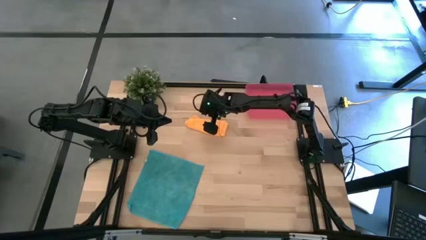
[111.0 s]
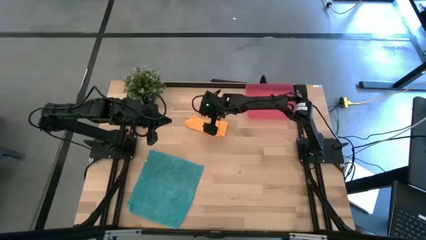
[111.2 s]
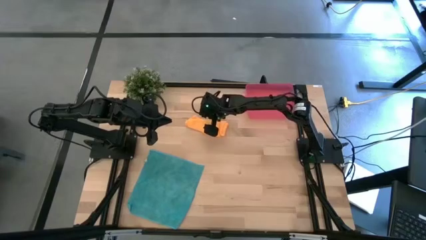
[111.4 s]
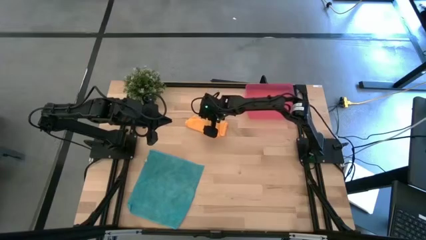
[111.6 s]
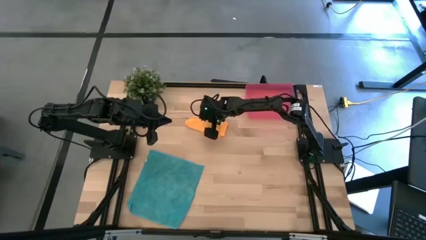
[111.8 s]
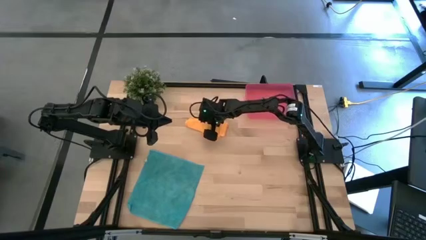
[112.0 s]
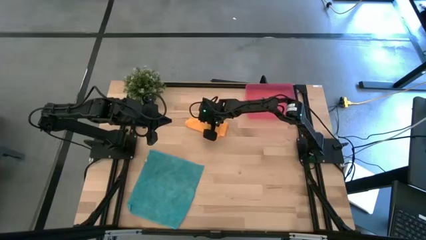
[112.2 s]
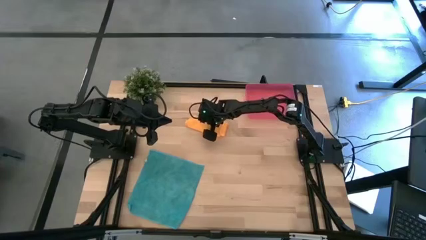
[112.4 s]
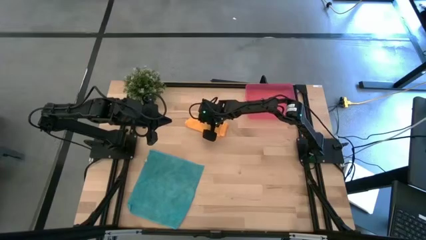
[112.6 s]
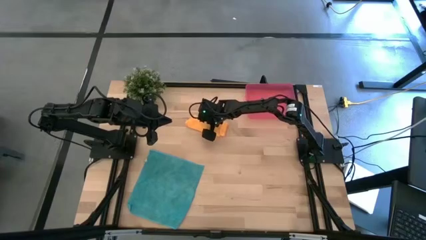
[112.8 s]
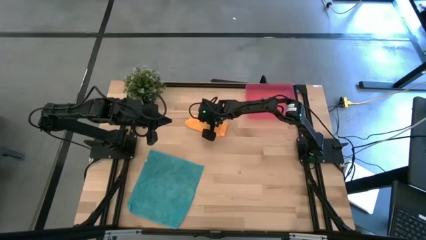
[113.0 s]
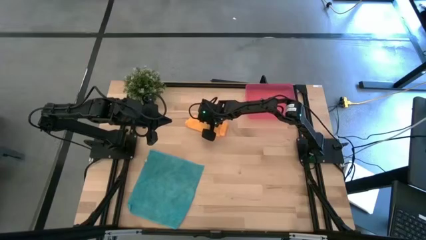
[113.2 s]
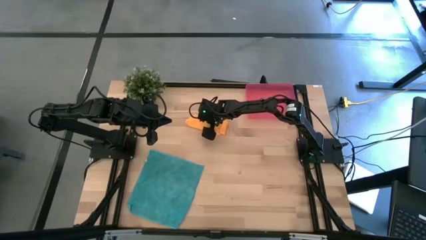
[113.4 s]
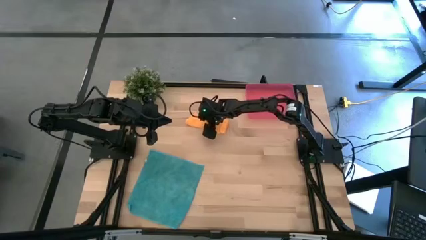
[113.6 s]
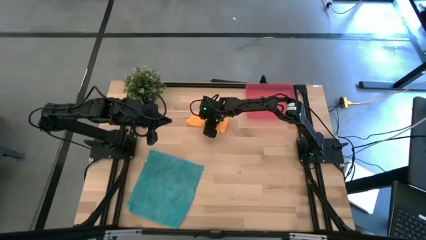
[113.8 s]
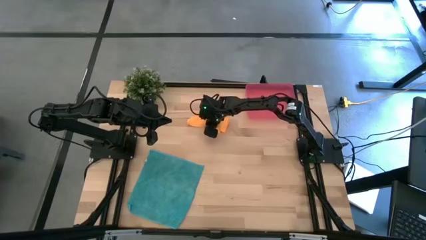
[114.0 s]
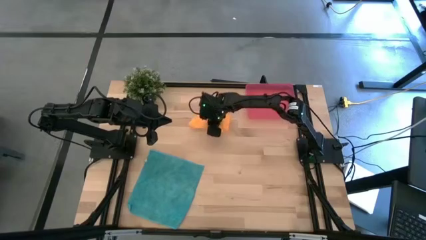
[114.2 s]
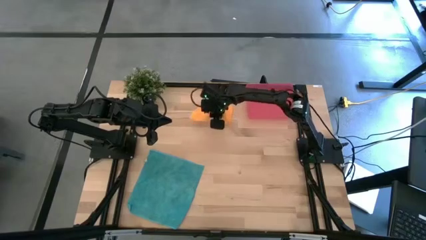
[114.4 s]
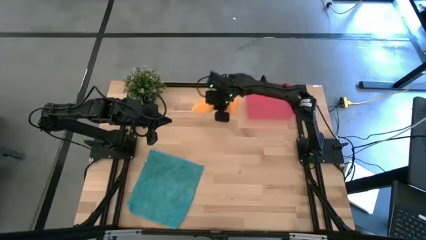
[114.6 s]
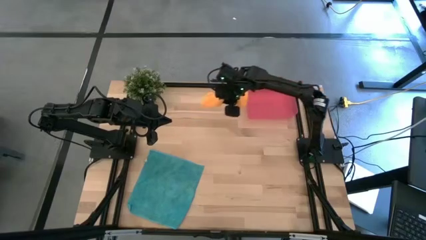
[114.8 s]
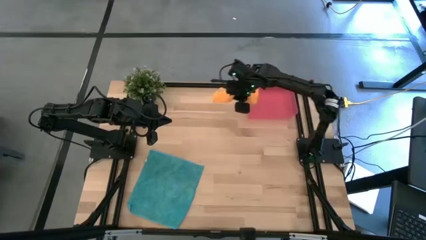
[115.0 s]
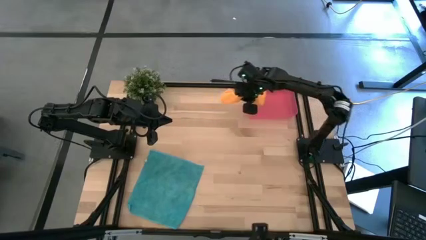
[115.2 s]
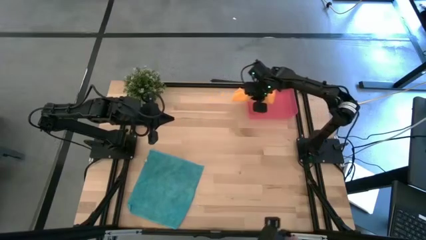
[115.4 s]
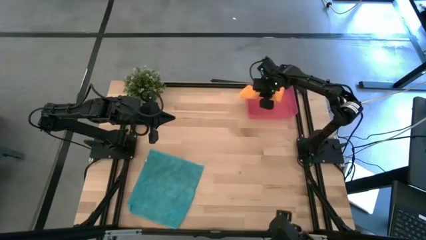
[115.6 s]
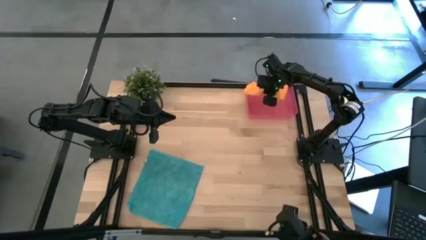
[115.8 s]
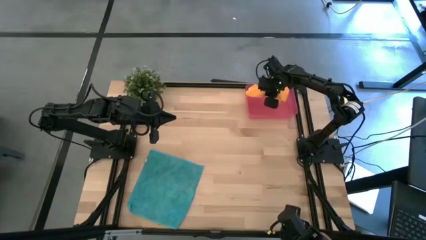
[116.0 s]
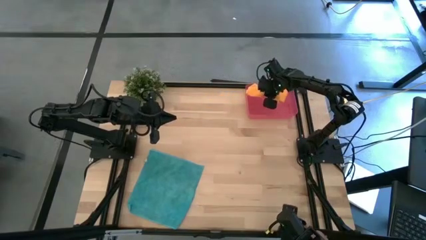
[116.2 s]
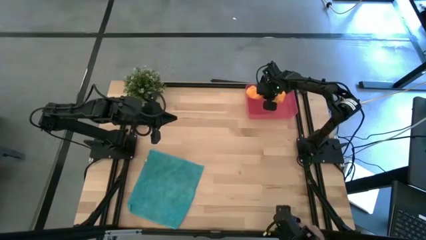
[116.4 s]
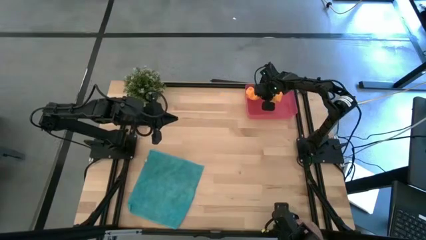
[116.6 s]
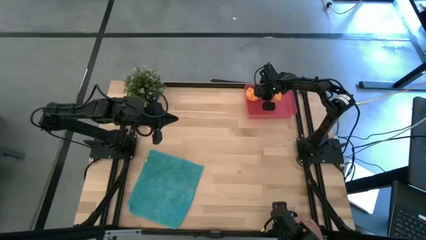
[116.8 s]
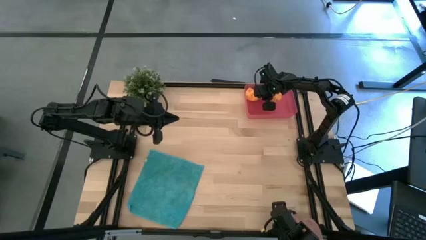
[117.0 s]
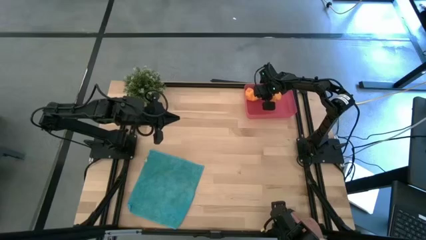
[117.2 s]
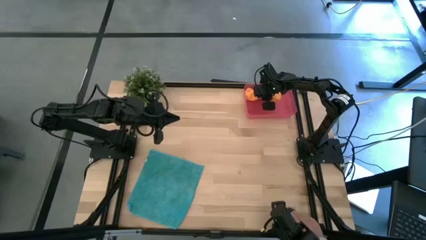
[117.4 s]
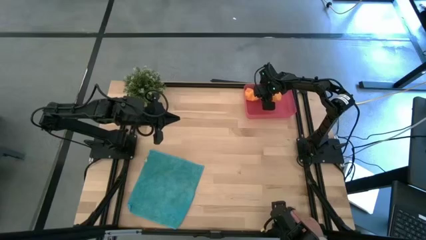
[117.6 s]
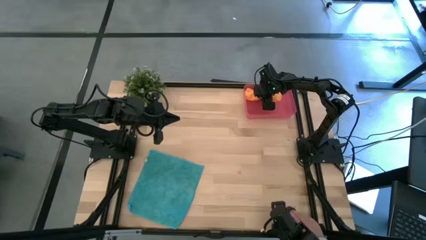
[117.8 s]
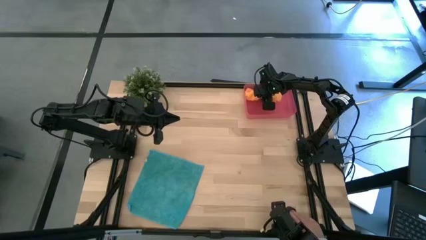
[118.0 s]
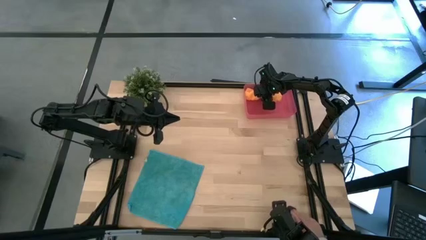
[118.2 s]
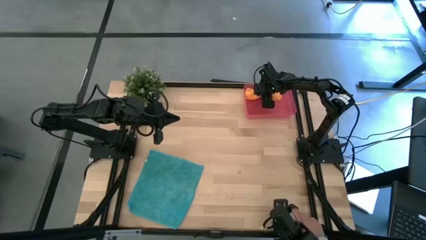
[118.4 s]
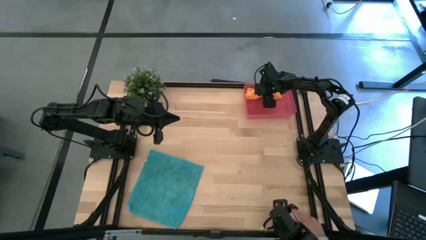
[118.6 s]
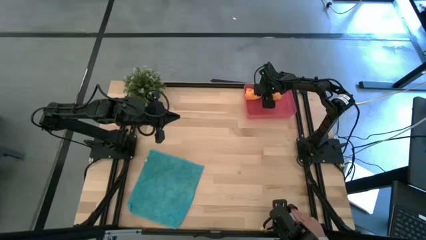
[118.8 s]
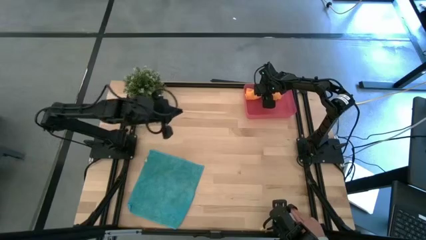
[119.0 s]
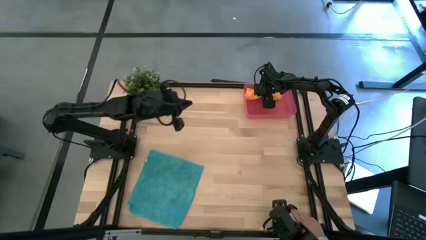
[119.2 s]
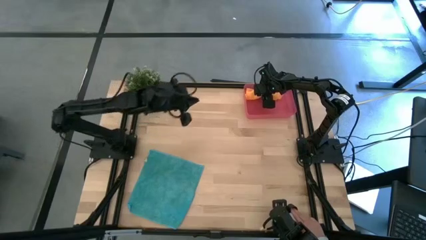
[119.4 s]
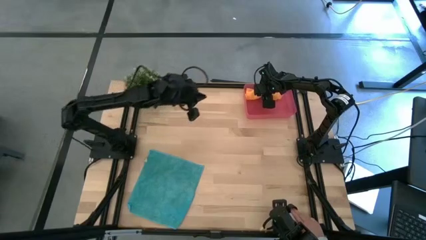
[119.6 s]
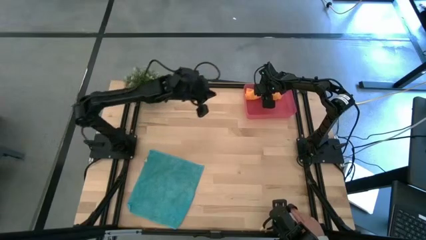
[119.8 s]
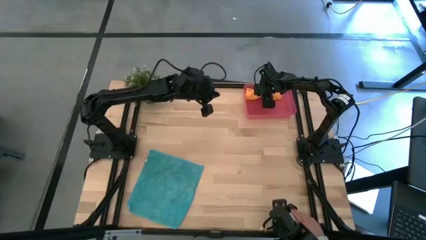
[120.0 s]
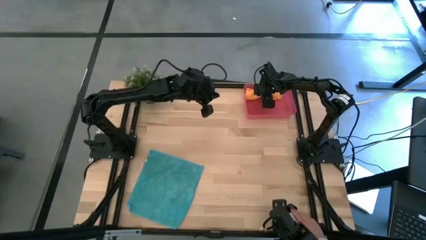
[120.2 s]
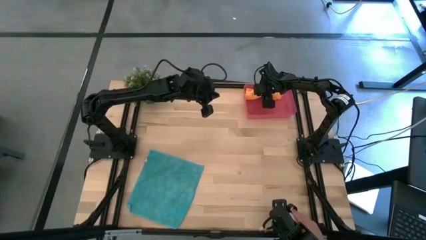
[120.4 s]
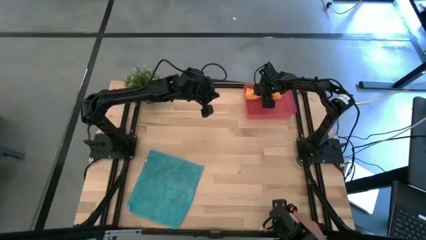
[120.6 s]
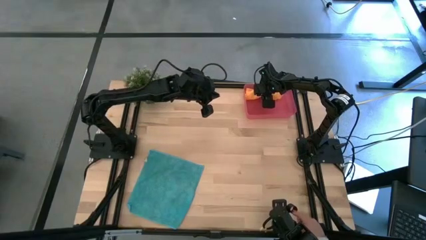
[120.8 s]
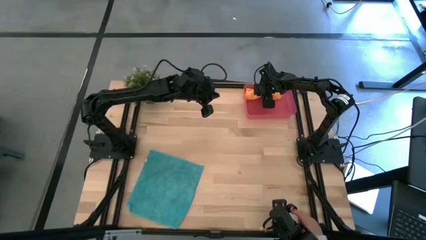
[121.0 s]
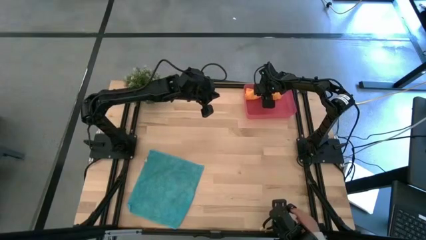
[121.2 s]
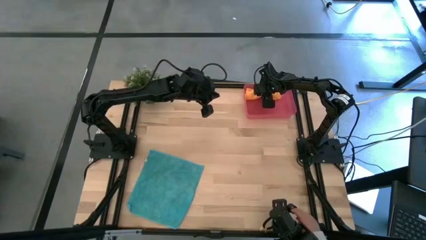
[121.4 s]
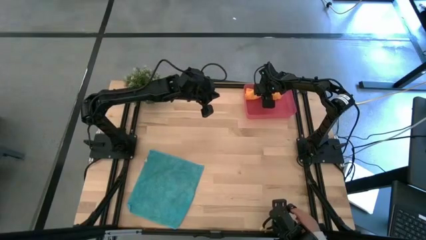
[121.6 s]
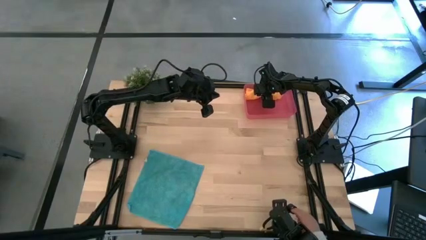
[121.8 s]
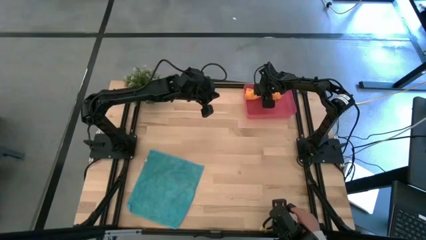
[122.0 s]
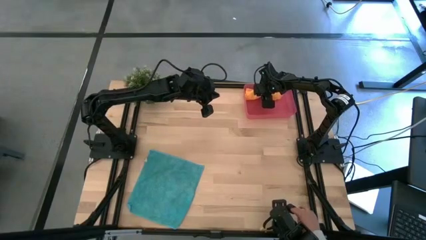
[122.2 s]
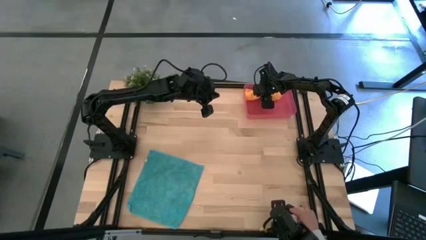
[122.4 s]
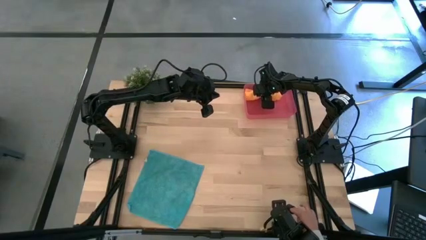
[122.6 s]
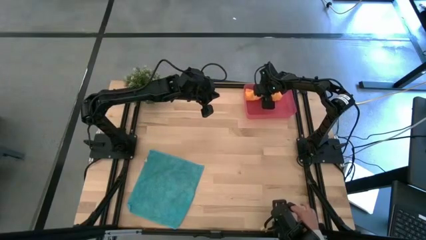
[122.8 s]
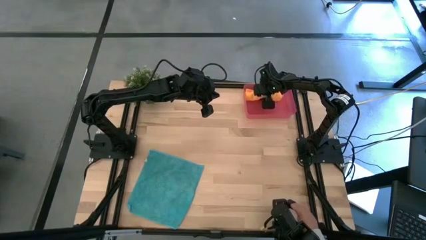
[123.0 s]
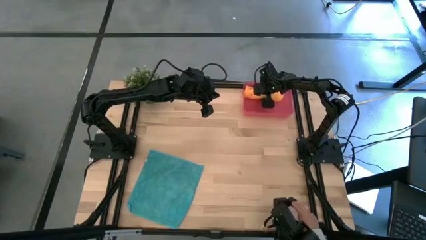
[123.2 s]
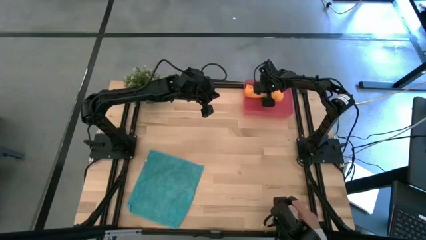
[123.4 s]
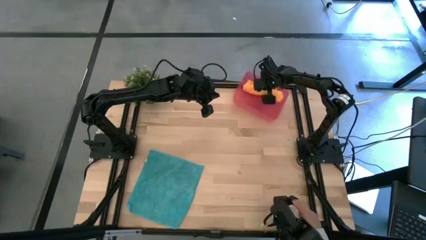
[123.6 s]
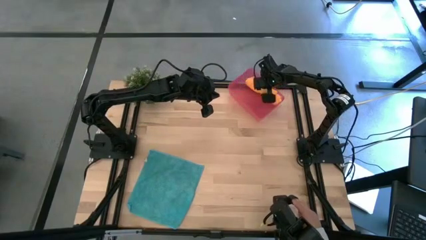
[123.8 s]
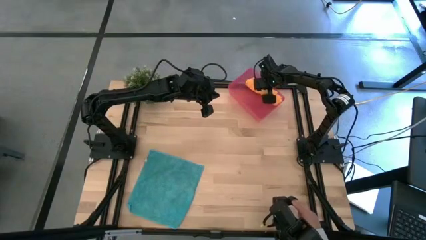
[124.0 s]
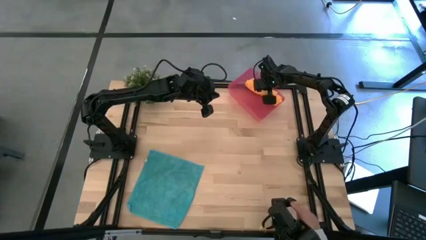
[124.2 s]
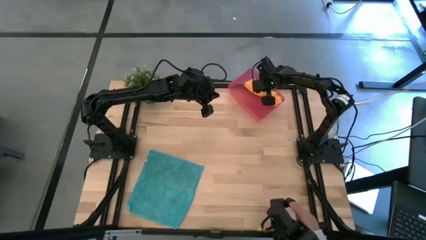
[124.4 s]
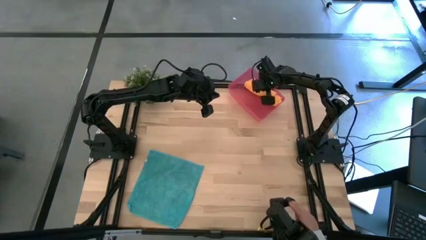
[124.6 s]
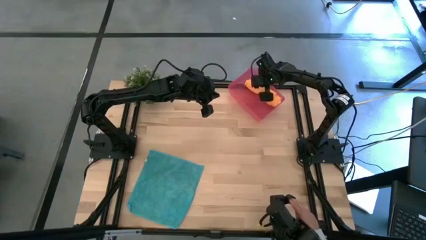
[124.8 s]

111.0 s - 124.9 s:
Task: Roll microfiber towels into tight, uniform cylinder then place into a basket
Put the orange microfiber towel into the pink bin
